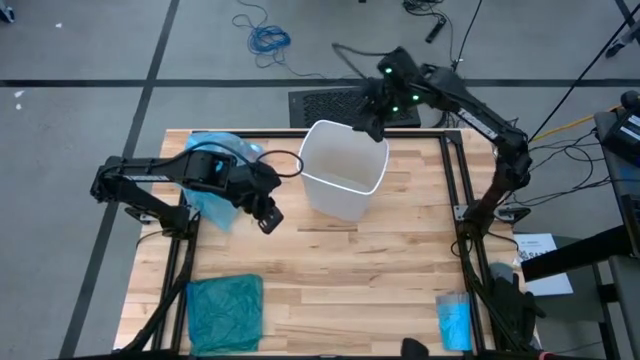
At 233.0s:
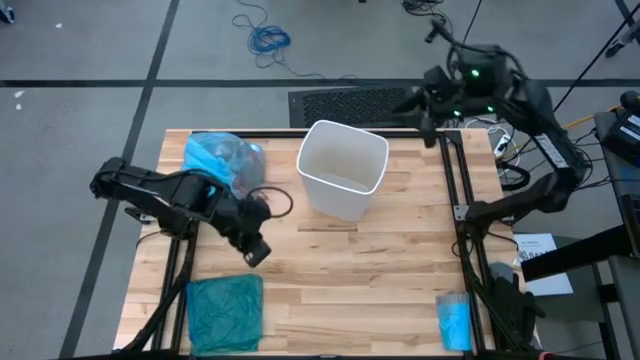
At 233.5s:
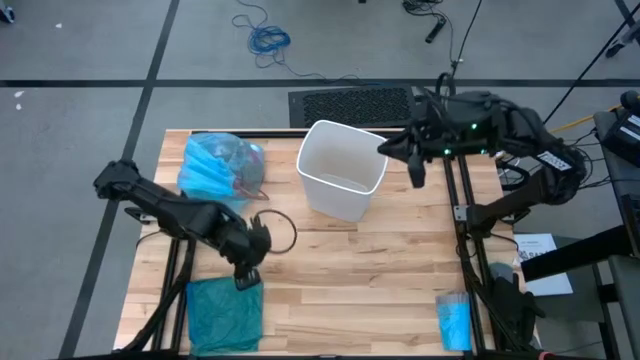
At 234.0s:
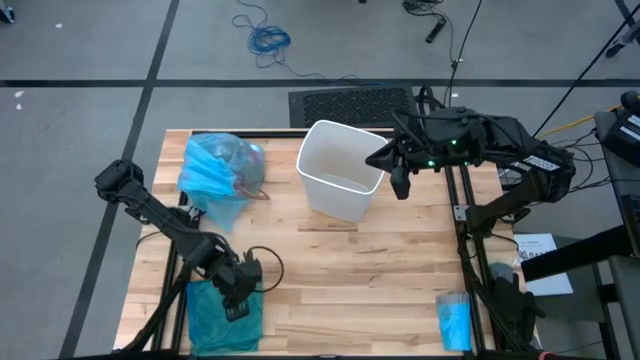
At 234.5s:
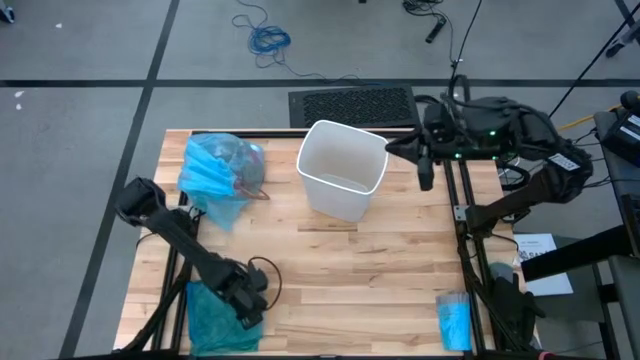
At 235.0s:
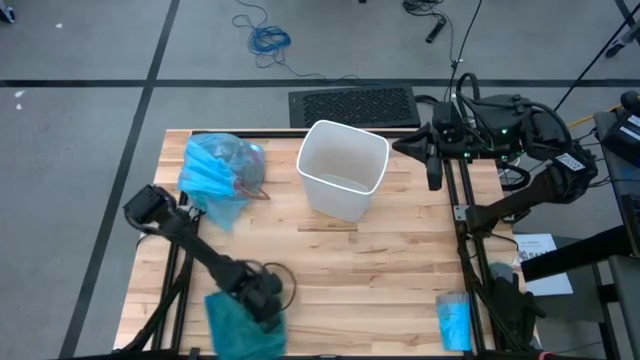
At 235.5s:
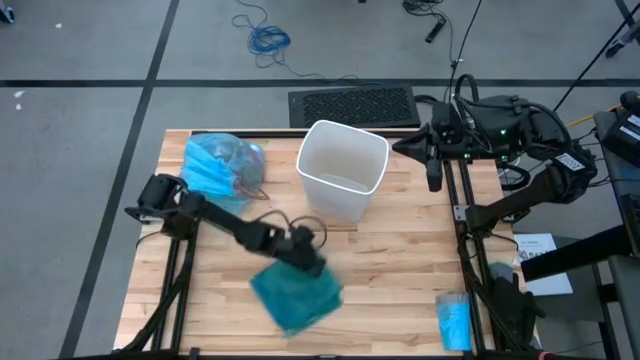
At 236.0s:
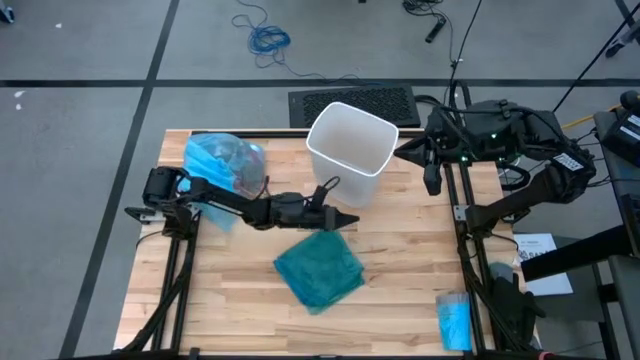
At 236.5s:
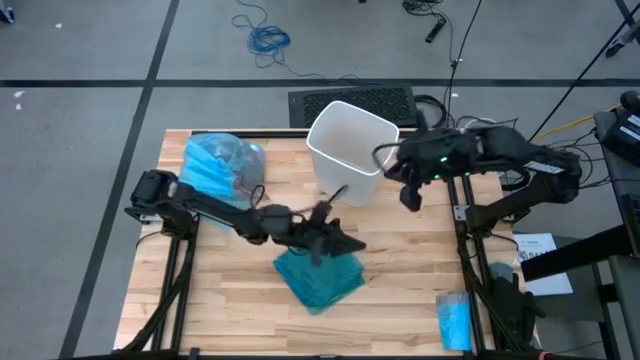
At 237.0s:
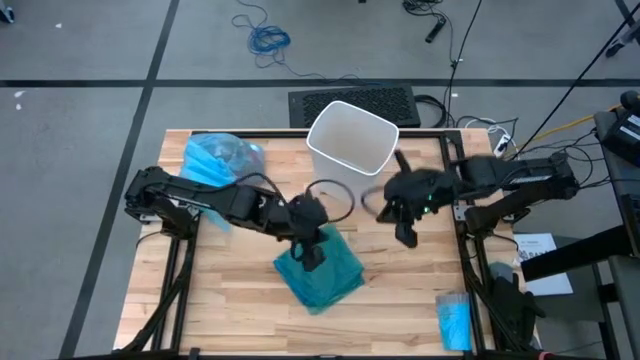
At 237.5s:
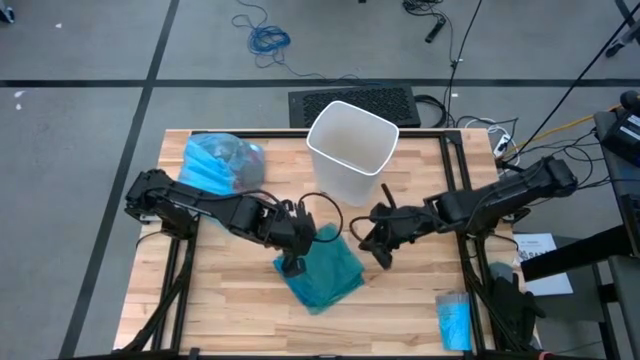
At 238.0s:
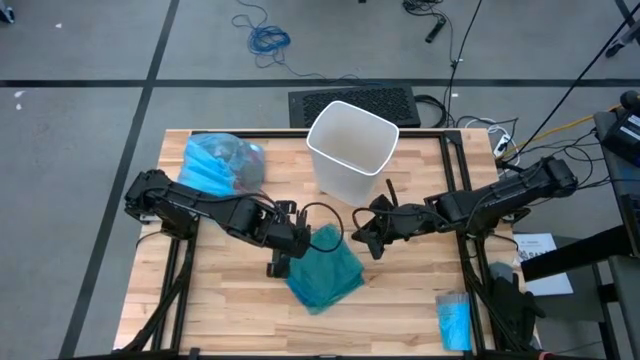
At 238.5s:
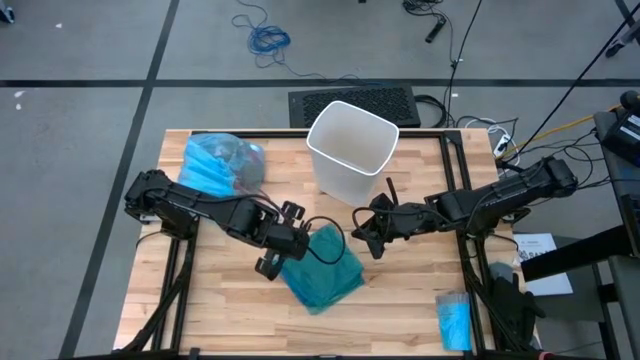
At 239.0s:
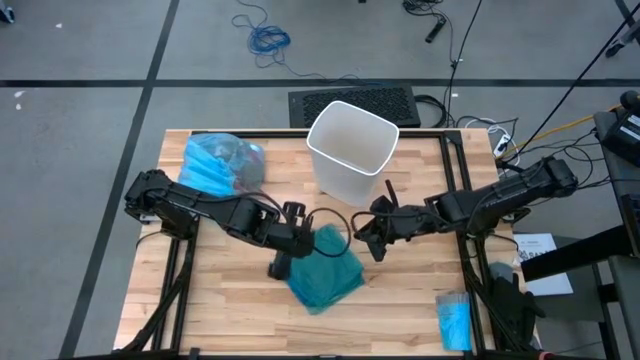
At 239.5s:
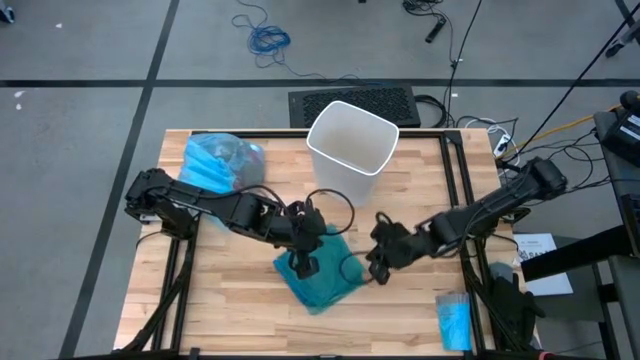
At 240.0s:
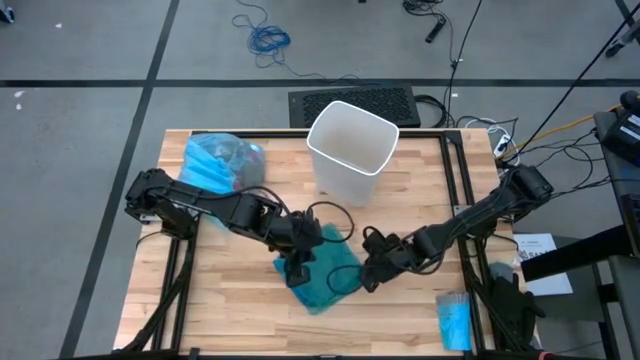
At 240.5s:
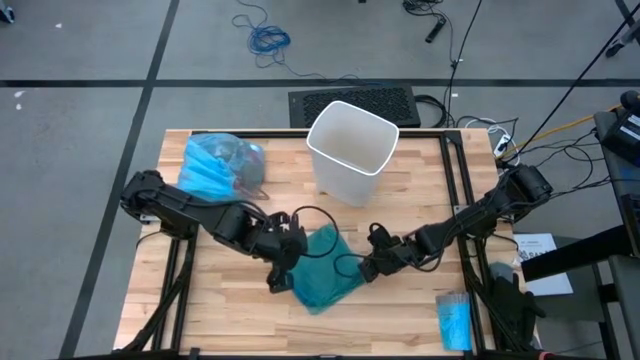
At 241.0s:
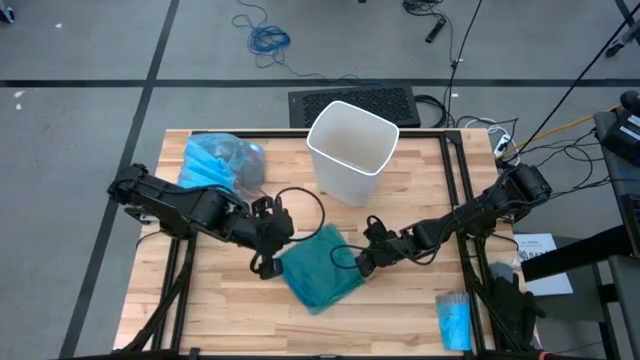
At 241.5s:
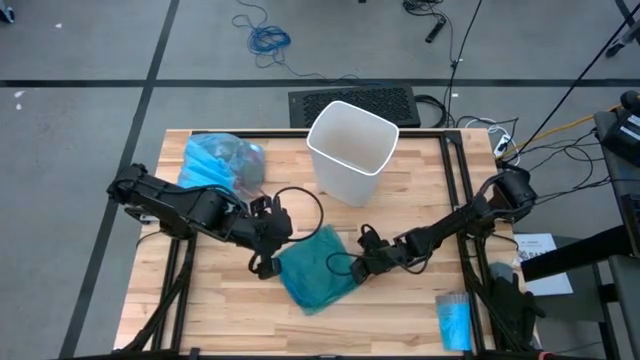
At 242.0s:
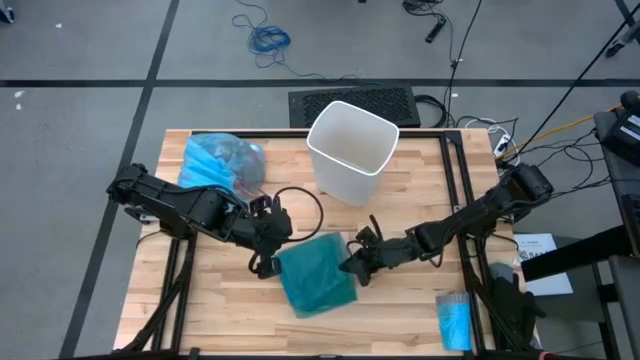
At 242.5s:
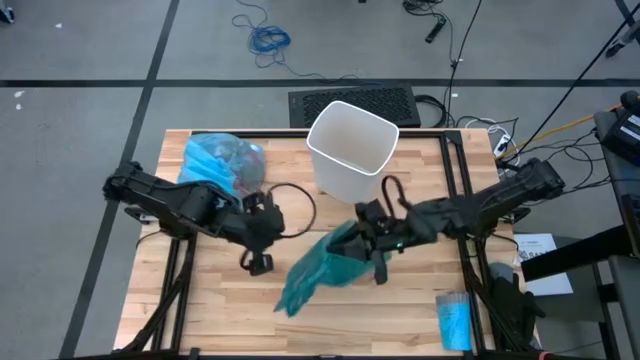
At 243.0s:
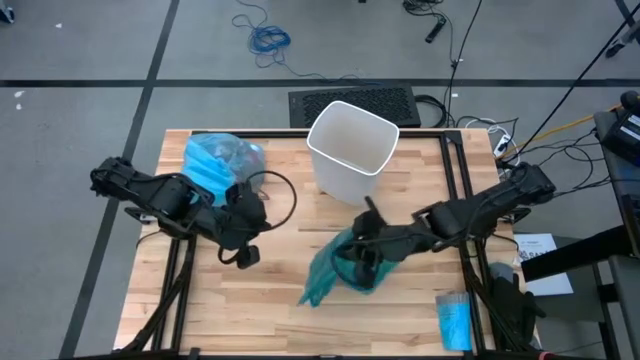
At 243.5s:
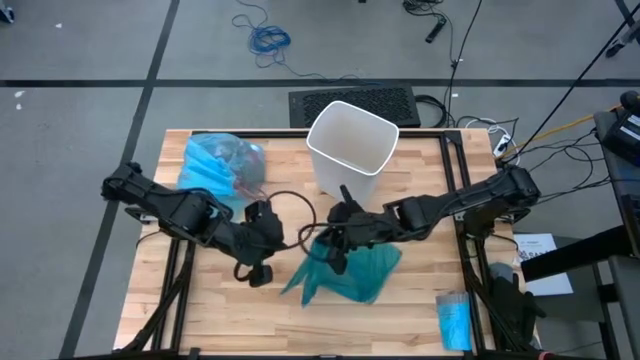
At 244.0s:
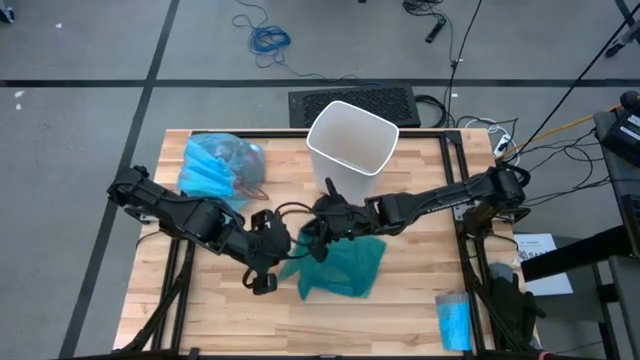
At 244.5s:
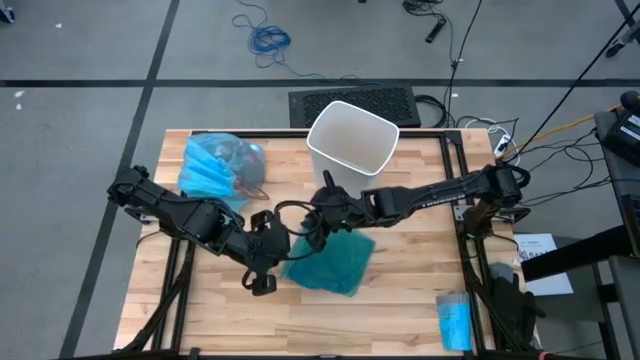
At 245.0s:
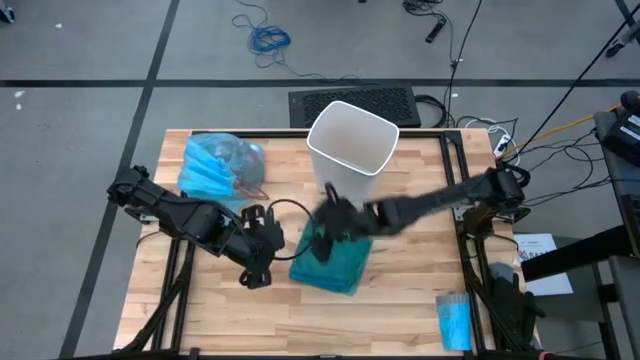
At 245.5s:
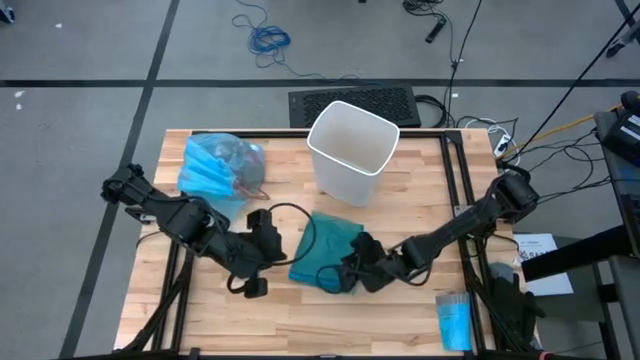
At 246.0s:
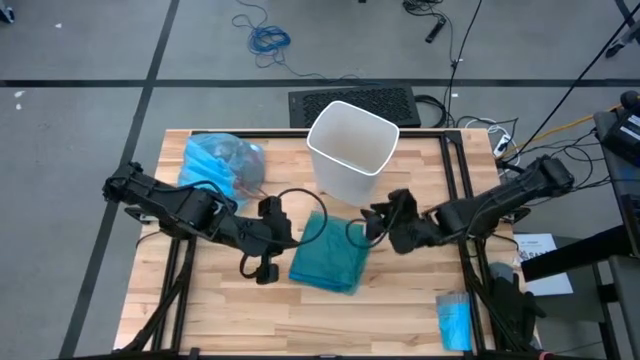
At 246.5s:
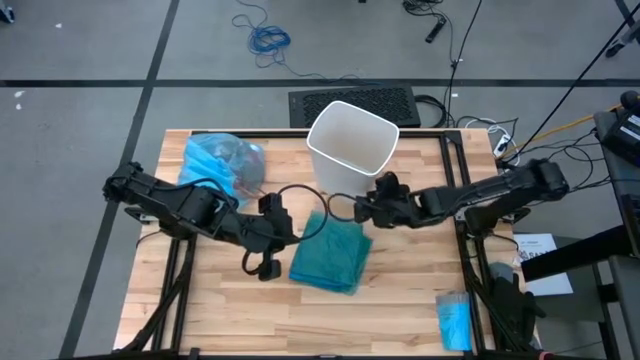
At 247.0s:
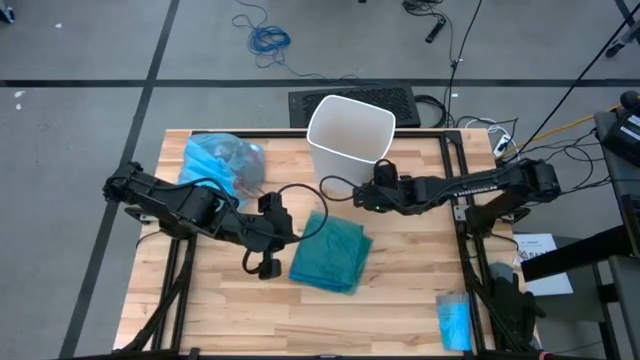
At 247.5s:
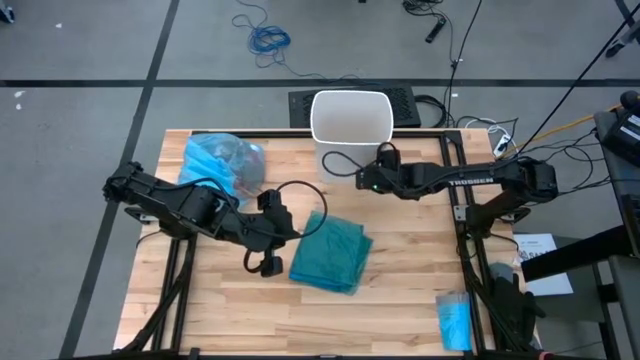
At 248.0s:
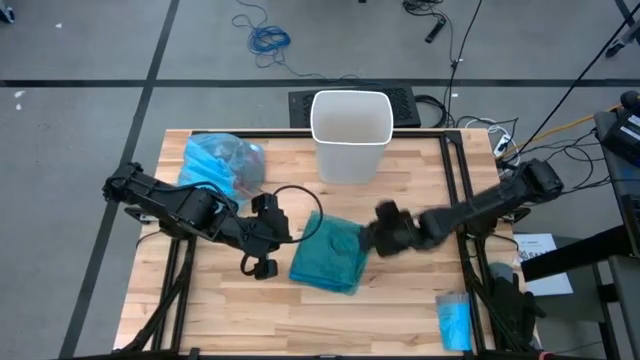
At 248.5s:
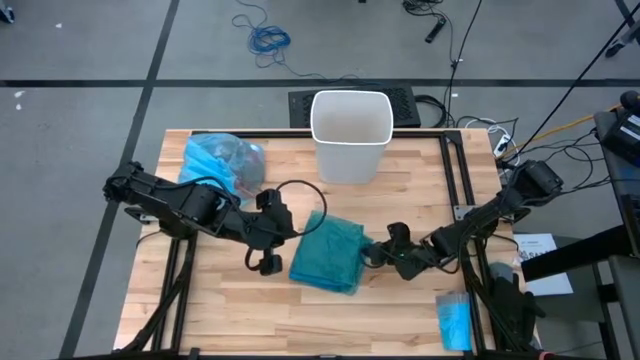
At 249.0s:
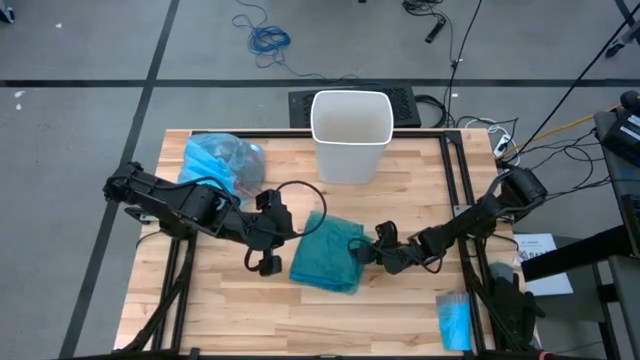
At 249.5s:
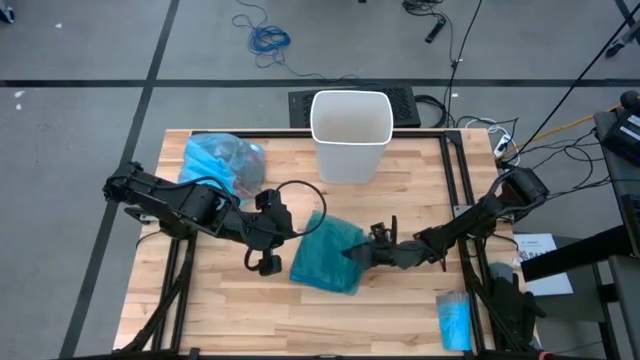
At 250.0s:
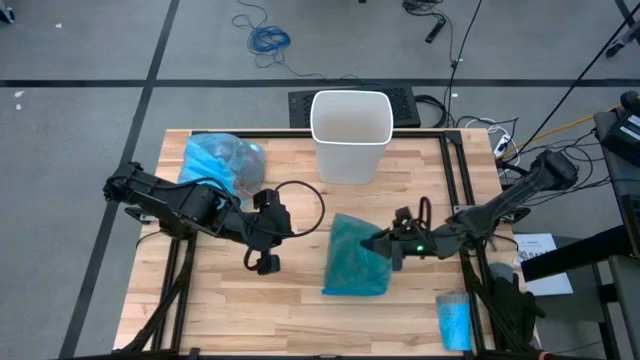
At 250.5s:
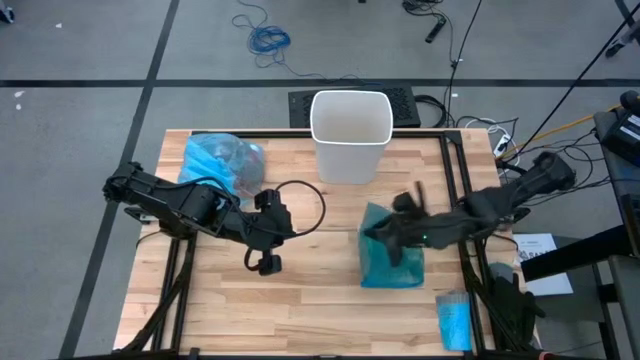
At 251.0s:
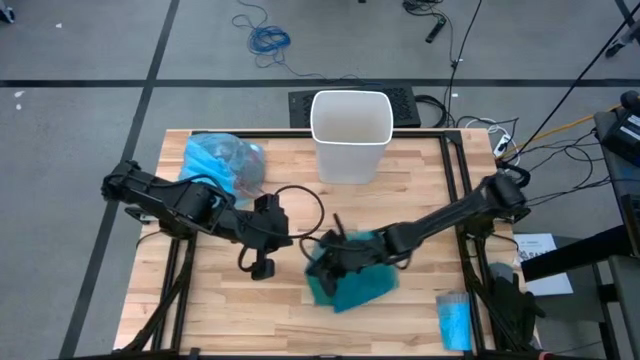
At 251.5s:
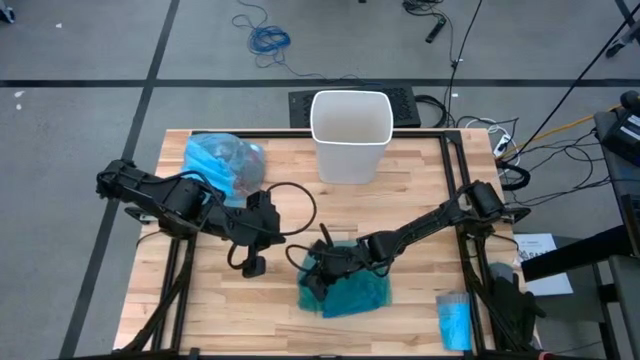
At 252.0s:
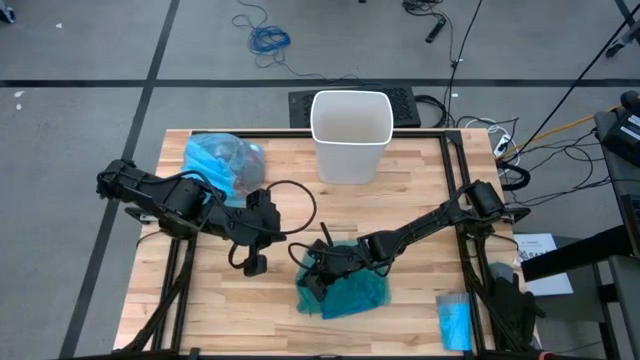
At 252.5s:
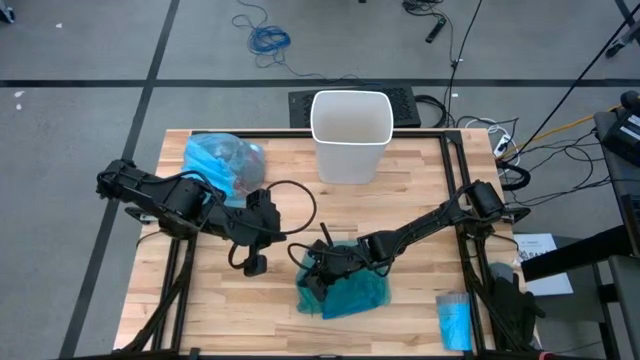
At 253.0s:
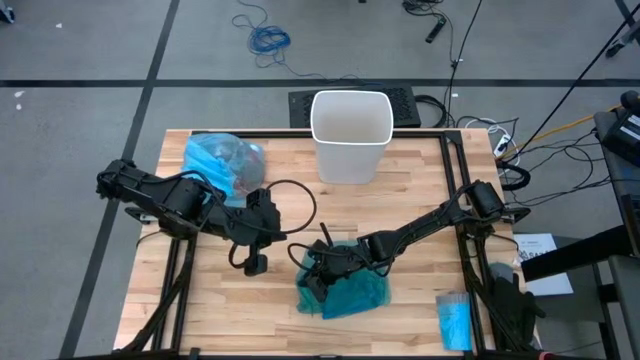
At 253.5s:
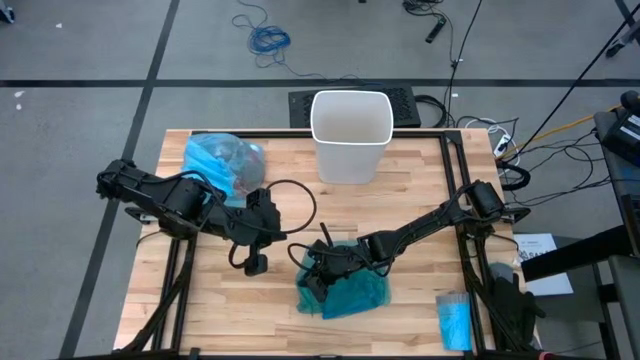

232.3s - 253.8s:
Task: place trash/remove bag and relplace
Insert the new blue trash bag into the white trash bin

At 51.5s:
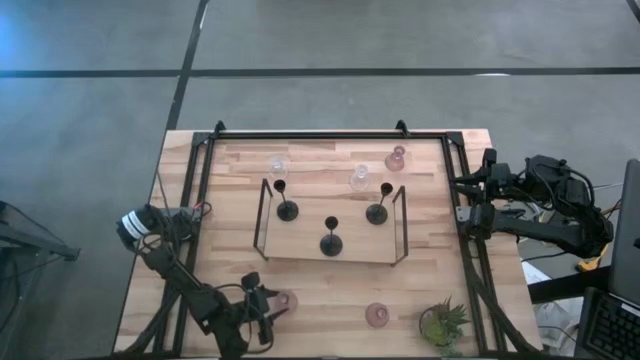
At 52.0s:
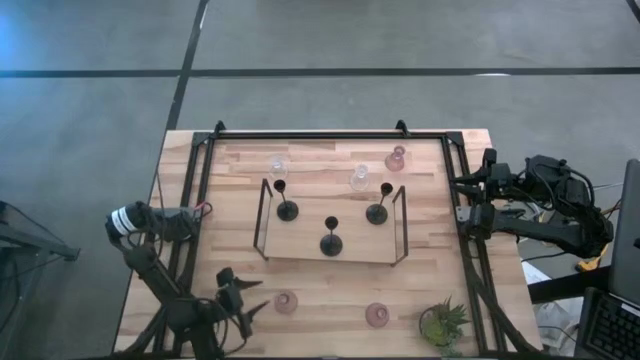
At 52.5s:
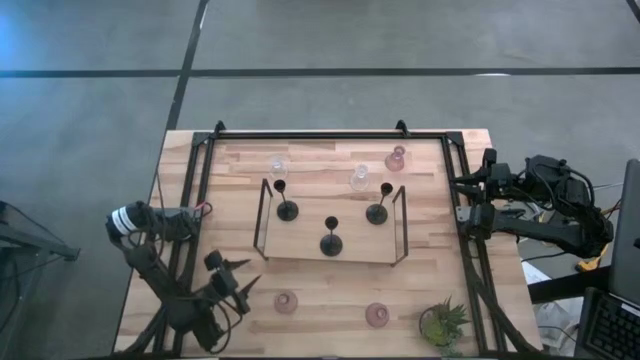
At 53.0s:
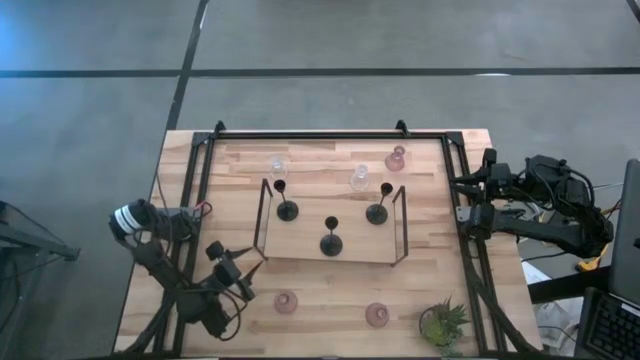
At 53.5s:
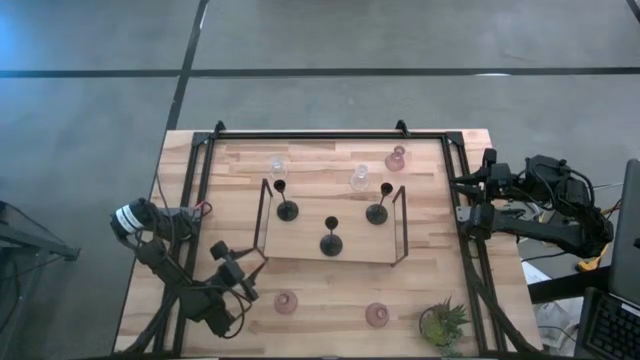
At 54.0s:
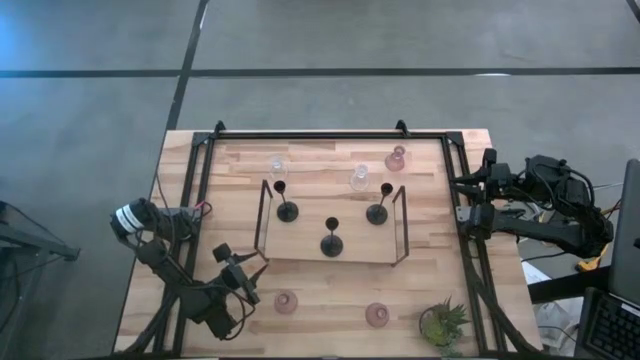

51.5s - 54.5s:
Task: Pick & Place candle stick holders
Adjust the shelf on the table
